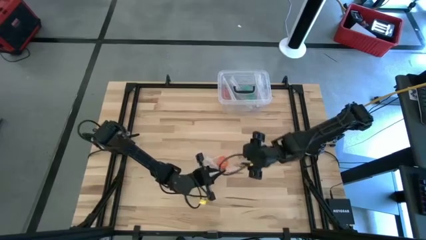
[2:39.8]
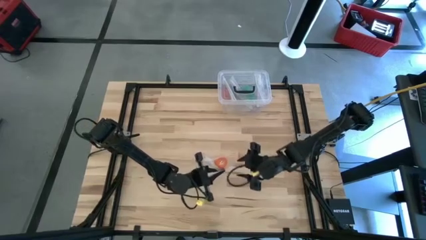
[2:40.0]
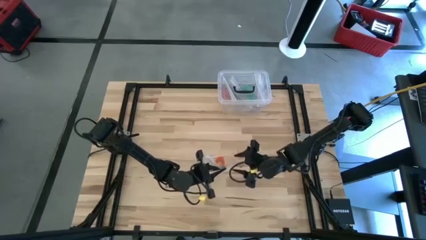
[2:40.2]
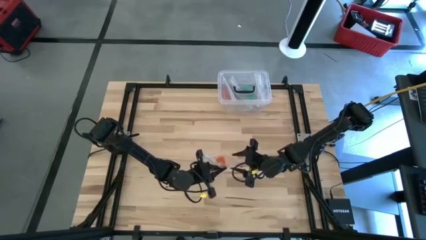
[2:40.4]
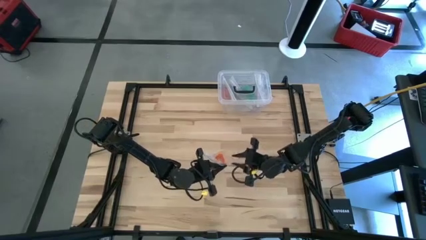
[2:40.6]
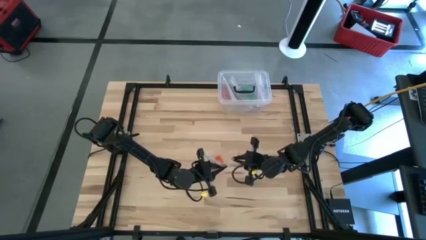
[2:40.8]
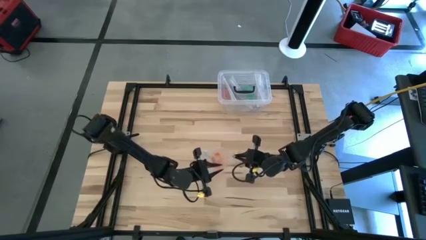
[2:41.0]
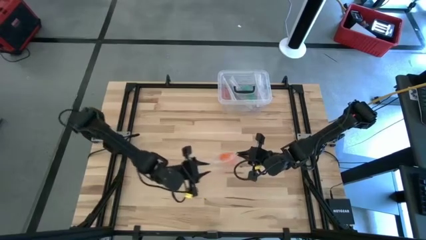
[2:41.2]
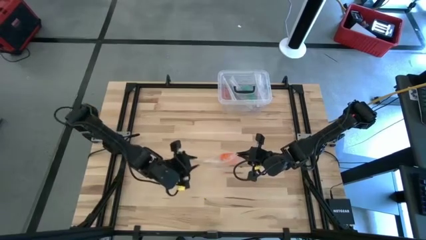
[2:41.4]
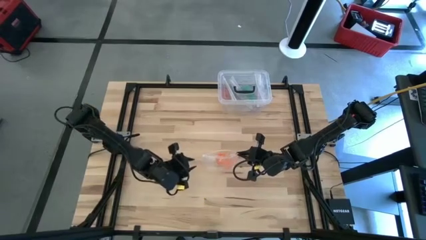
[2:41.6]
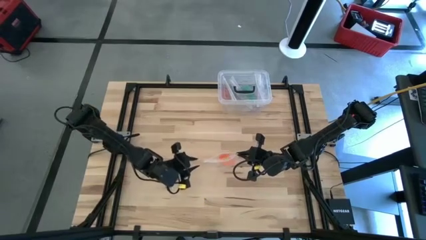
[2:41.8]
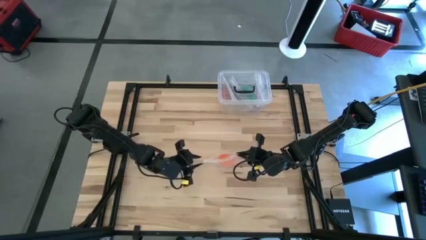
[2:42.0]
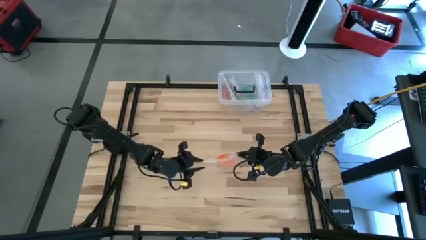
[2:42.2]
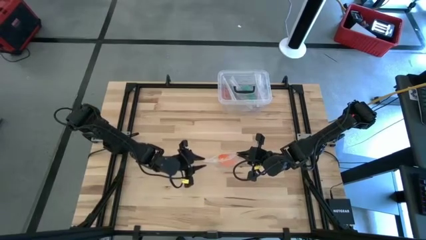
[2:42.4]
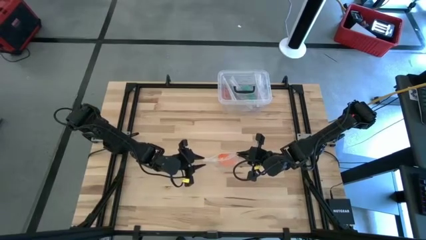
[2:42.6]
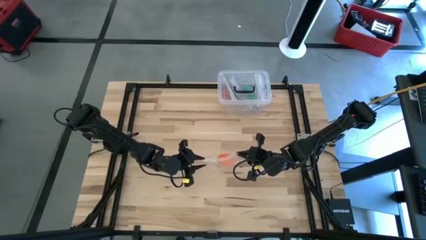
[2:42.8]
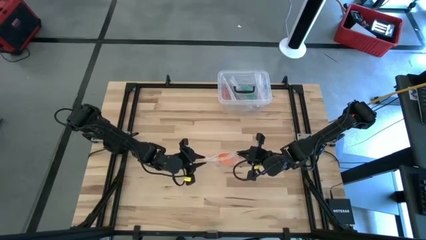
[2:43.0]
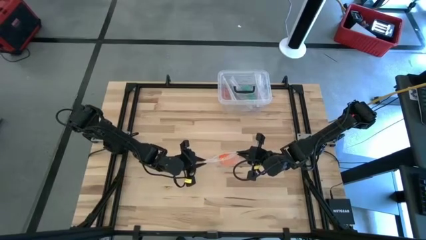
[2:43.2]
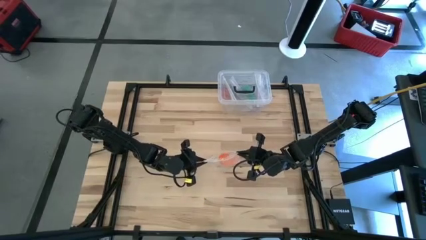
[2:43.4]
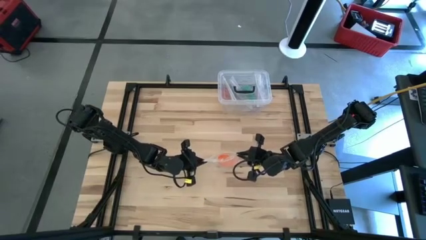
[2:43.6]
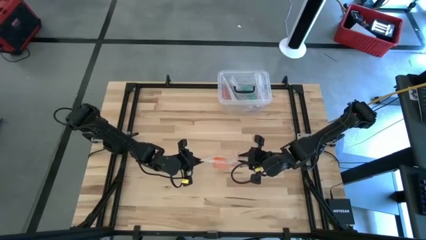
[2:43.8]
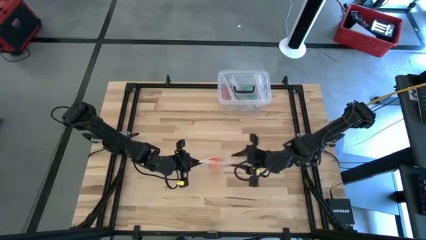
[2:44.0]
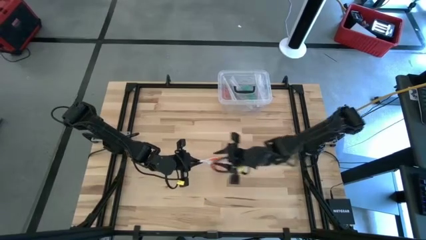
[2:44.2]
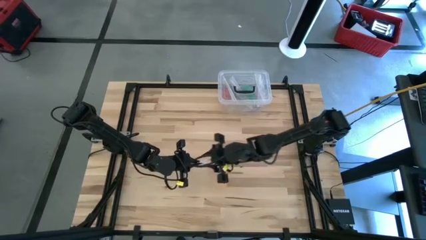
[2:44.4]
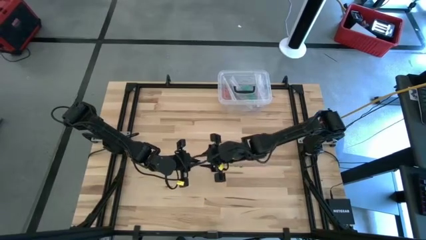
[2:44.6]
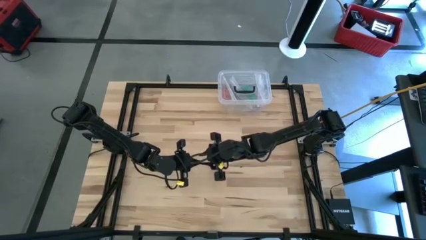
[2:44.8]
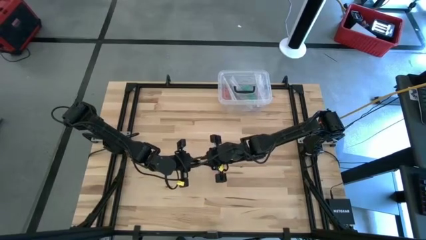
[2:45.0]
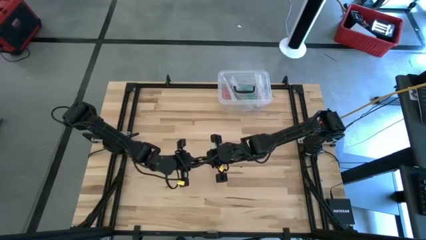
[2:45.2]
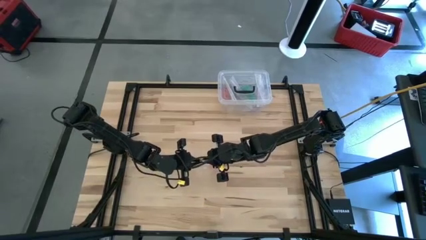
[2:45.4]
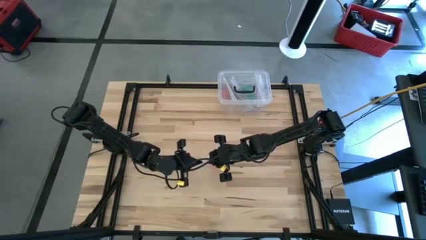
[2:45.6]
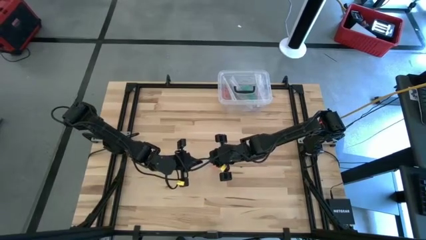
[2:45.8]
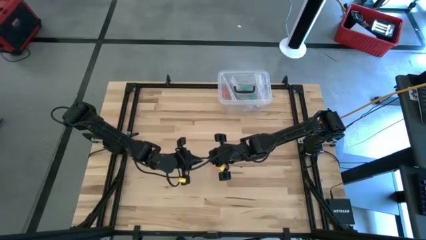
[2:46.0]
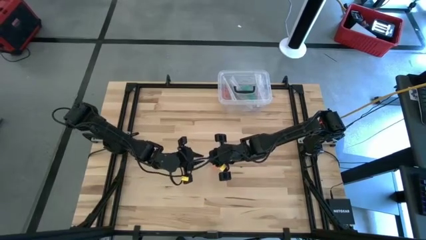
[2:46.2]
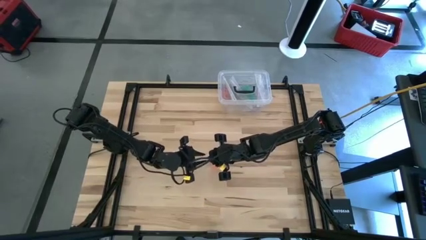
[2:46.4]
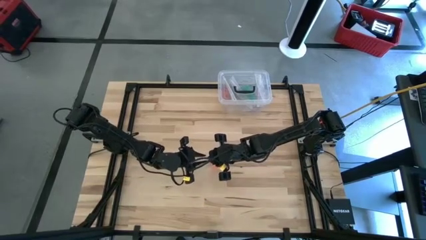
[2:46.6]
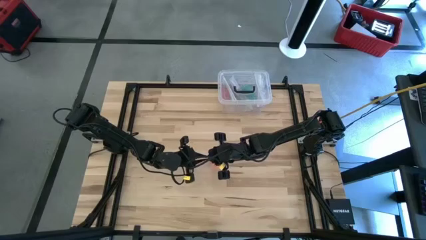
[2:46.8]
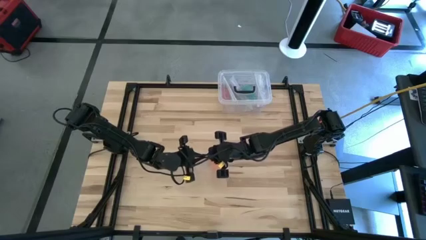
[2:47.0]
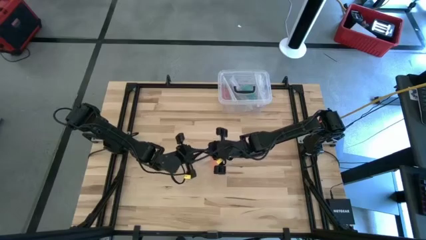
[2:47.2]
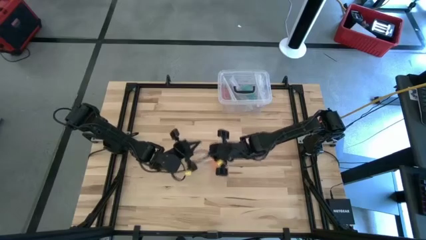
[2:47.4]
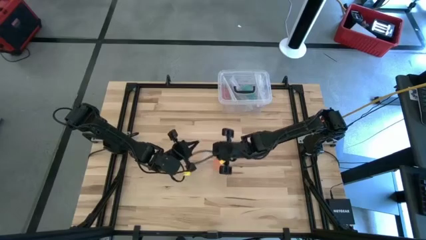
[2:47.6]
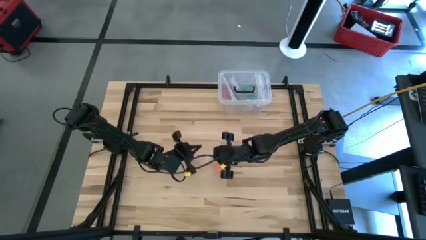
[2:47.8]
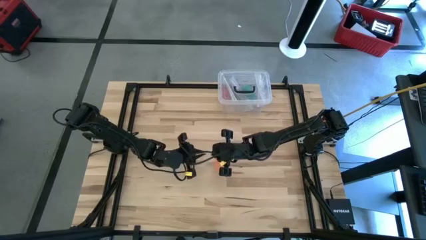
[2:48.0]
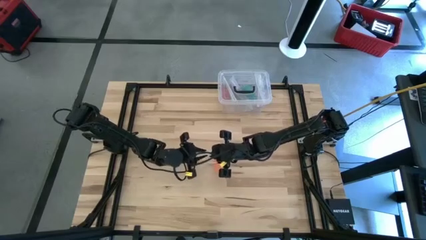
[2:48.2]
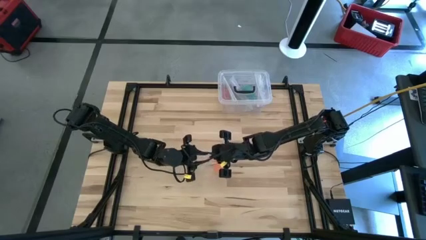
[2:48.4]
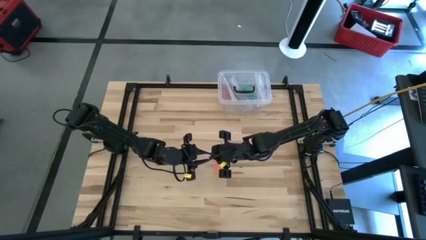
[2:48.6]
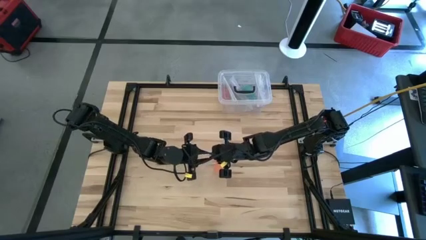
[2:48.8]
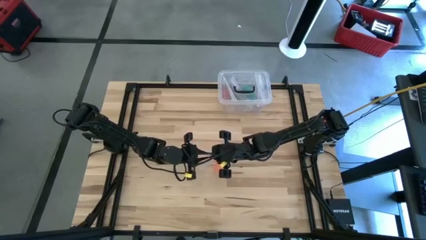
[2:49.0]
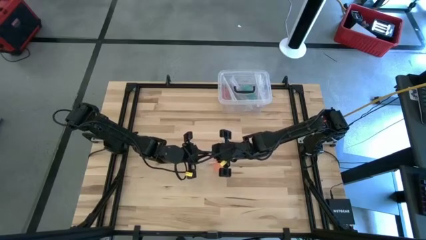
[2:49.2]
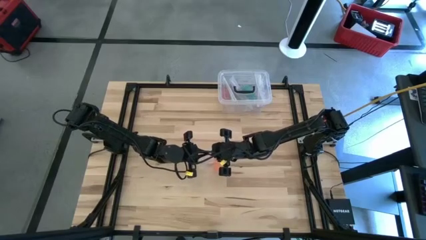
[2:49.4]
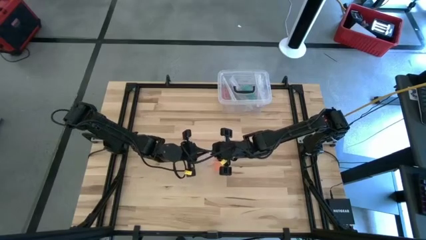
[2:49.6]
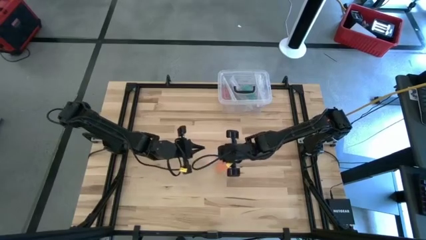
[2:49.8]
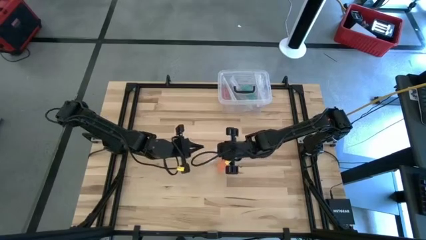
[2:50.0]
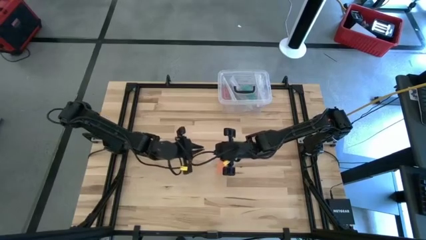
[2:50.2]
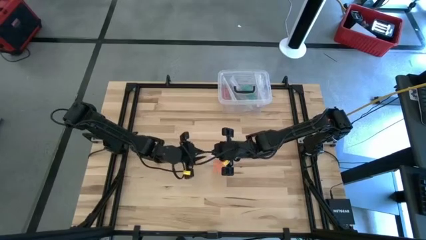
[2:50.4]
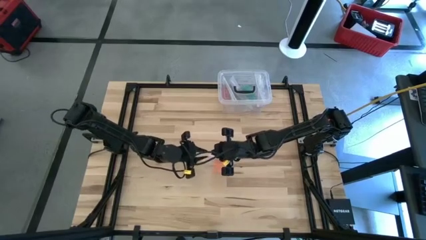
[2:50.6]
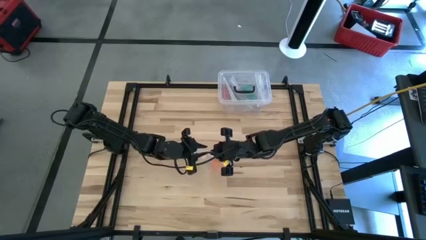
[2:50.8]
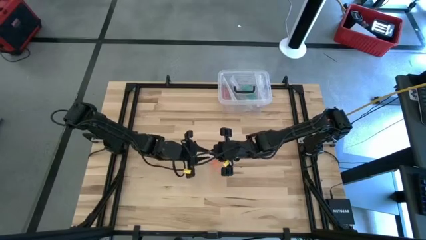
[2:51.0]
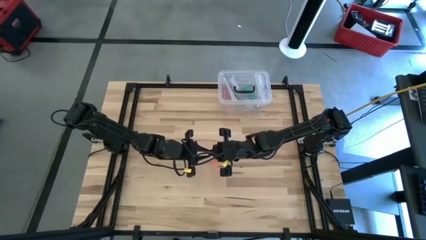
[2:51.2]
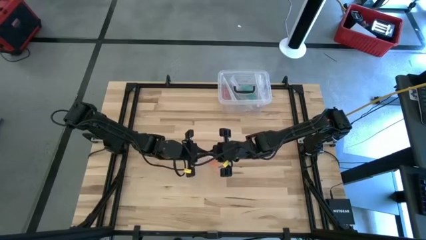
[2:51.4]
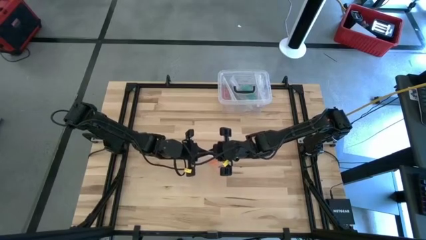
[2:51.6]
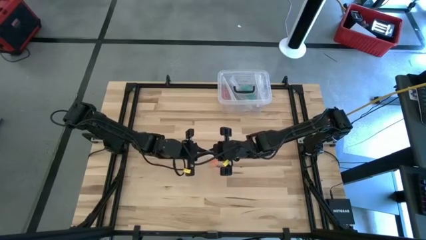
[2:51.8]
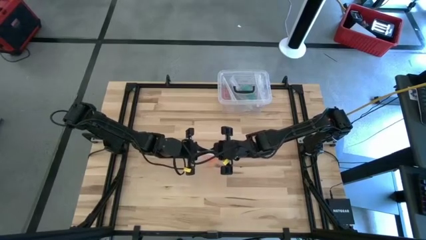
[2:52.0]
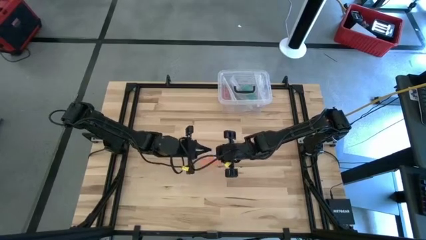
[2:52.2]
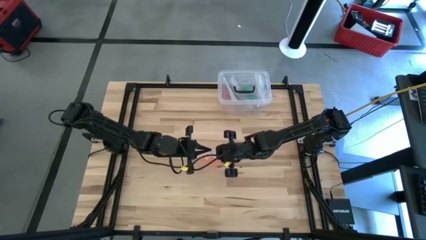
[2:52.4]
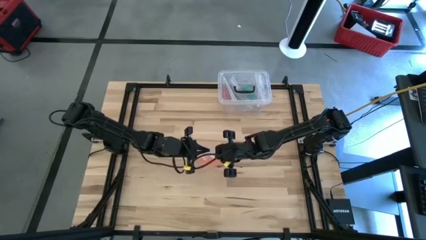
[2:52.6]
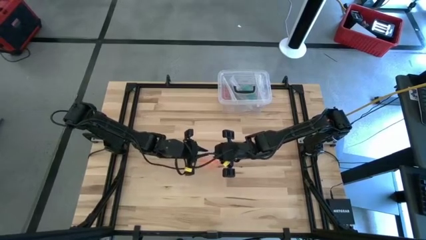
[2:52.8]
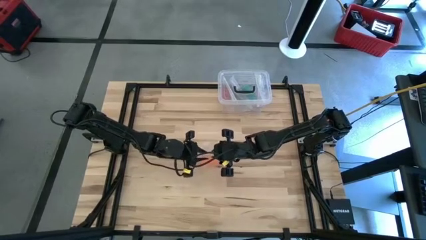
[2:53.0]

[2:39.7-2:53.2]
Task: Roll bandage
Close the zip bag

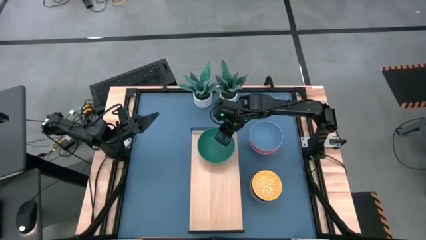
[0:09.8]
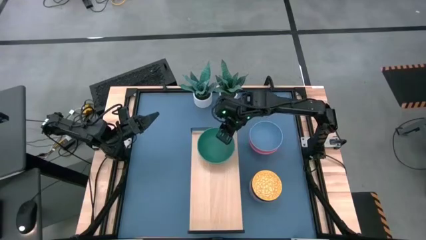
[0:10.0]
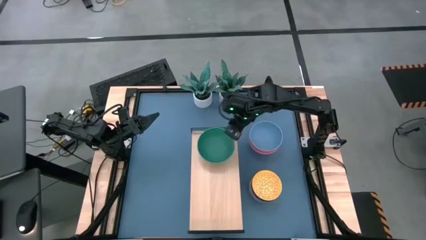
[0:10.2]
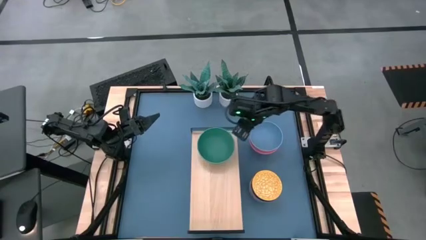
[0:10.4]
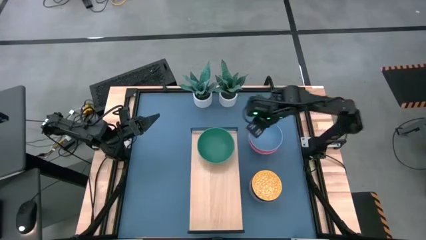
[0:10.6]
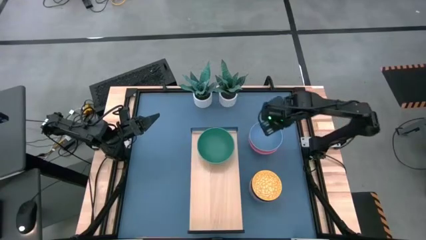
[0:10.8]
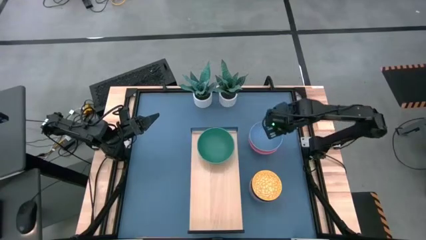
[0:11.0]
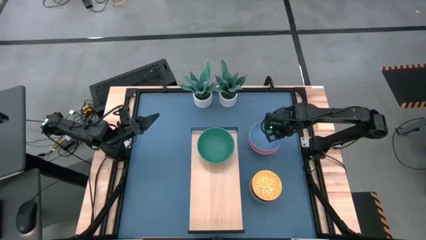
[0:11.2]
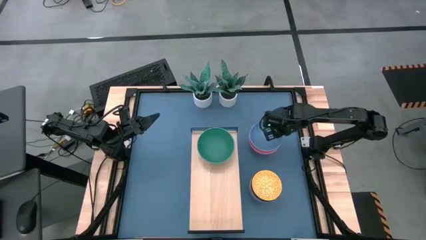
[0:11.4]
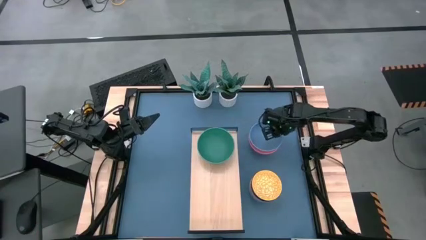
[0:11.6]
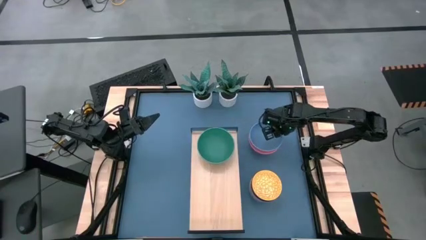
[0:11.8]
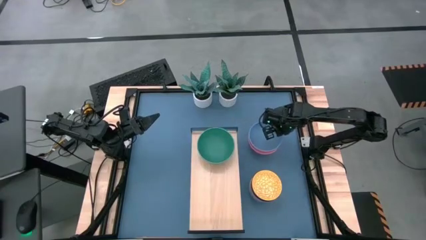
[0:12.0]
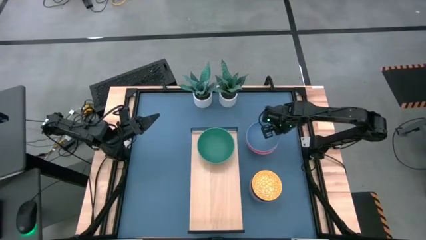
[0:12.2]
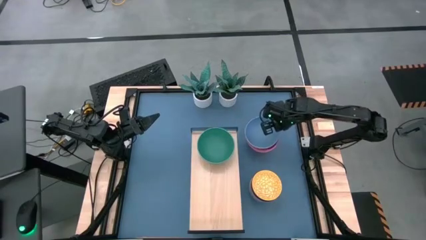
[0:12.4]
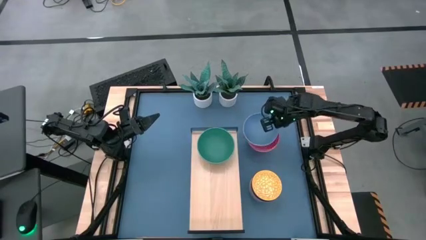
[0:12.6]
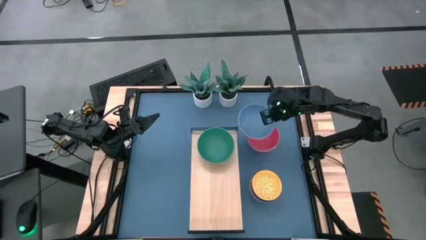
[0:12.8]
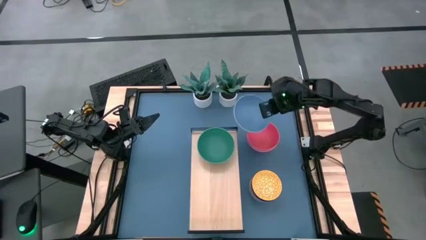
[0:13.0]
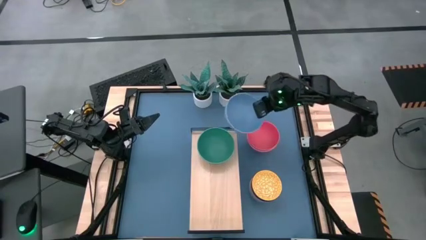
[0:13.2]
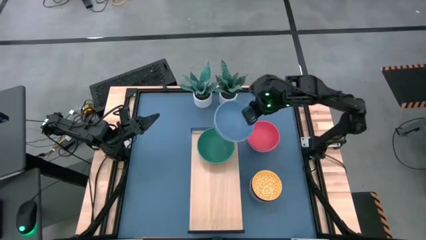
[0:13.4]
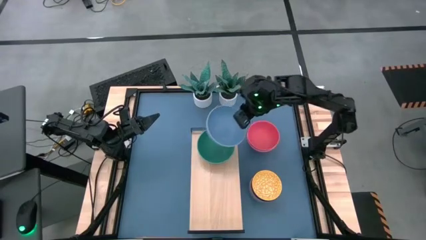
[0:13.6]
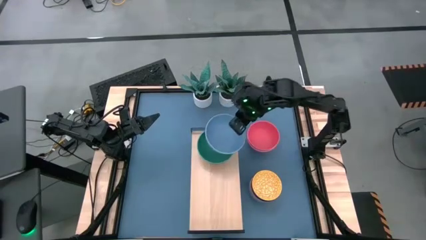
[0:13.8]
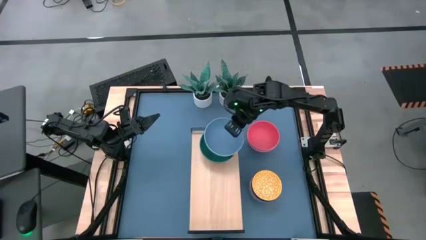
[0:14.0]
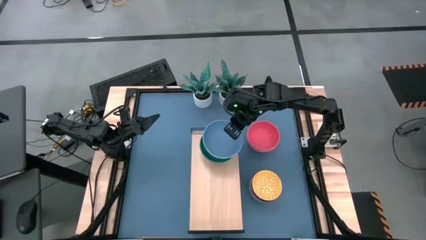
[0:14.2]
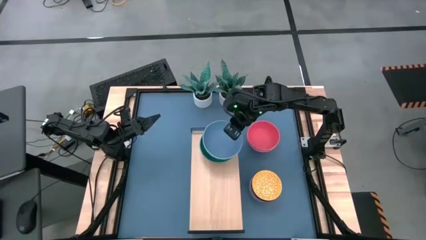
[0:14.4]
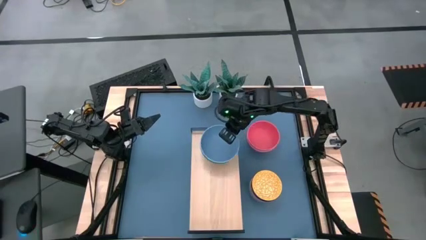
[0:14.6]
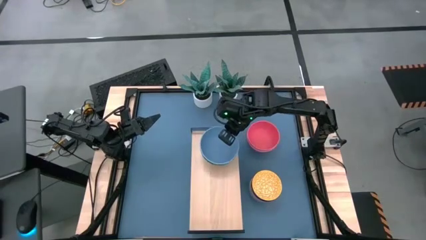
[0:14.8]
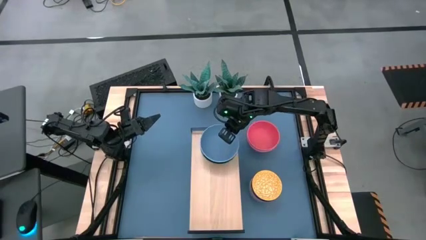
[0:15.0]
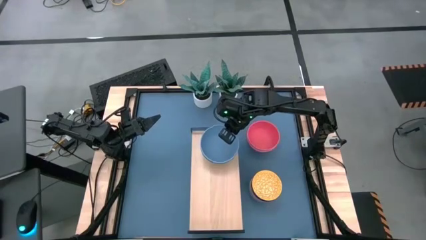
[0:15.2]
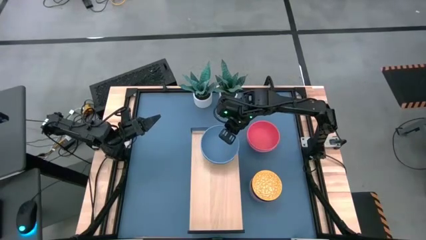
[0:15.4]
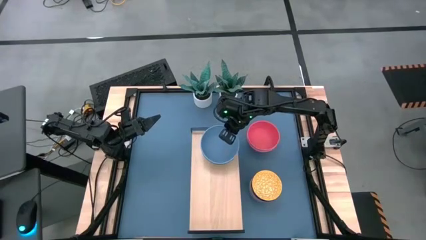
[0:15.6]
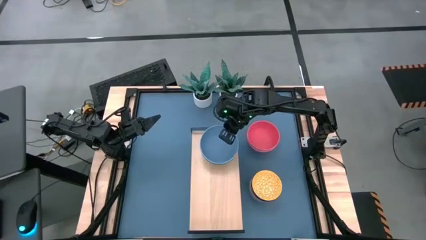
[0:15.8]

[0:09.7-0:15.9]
Task: Place and stack bowls onto a shelf
Stack the blue bowl on top of the green bowl on the shelf
